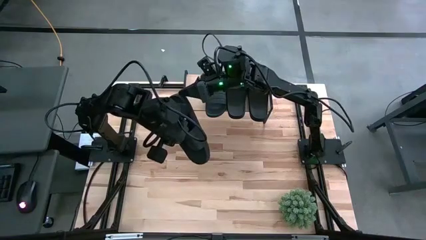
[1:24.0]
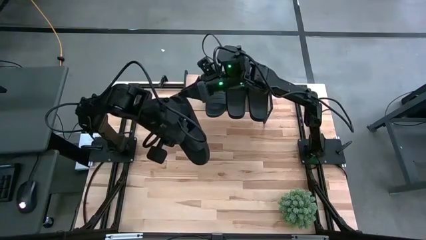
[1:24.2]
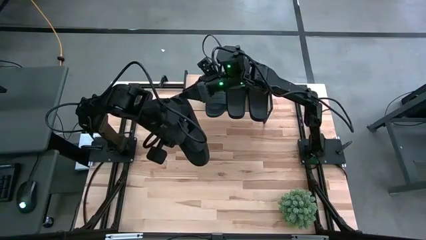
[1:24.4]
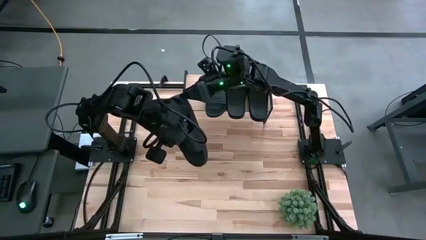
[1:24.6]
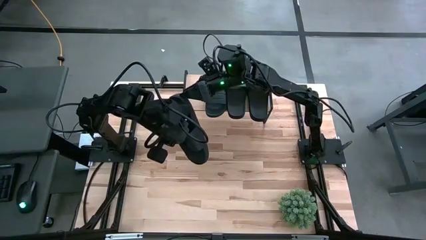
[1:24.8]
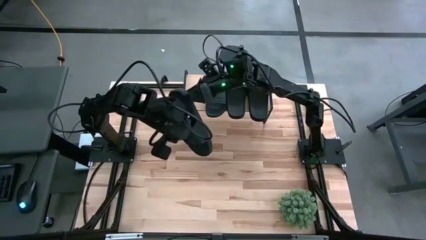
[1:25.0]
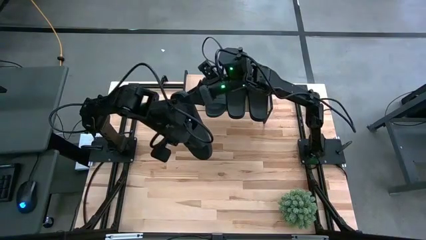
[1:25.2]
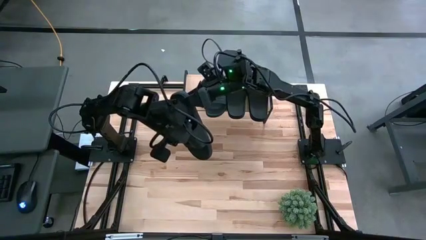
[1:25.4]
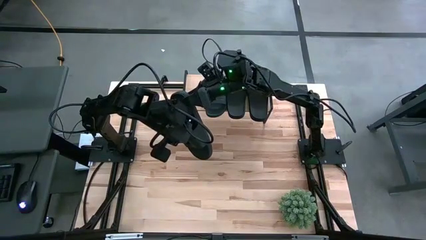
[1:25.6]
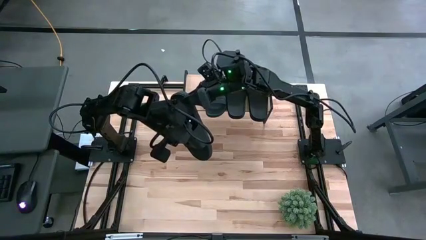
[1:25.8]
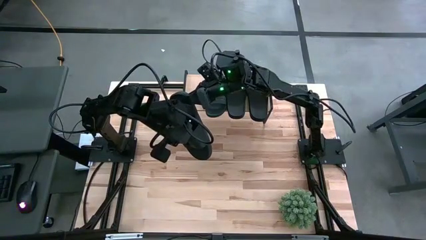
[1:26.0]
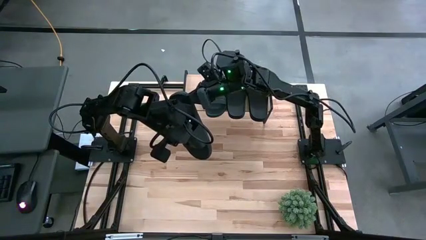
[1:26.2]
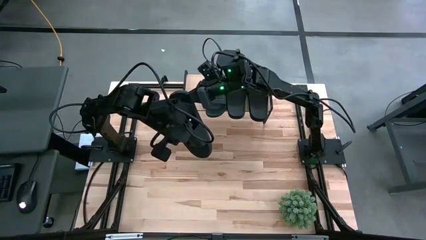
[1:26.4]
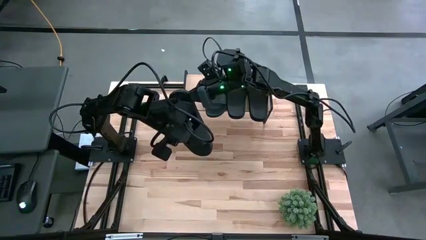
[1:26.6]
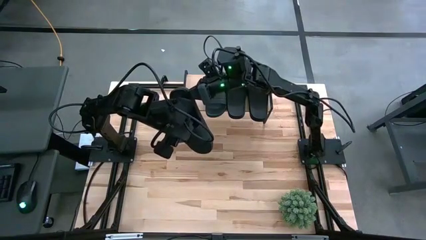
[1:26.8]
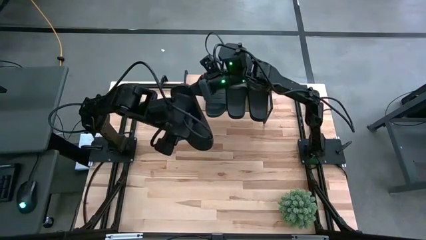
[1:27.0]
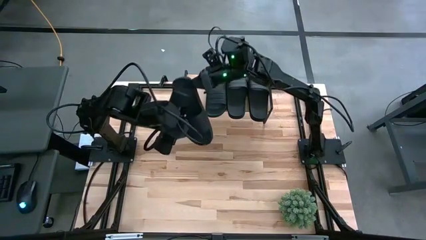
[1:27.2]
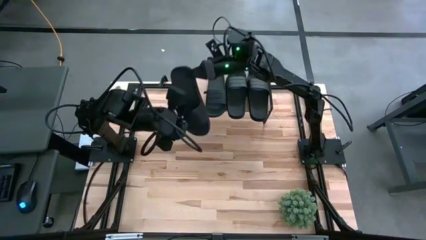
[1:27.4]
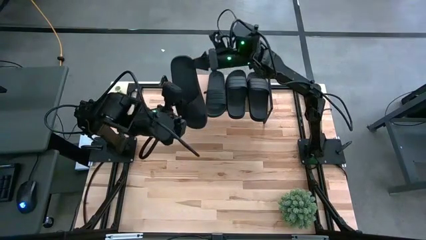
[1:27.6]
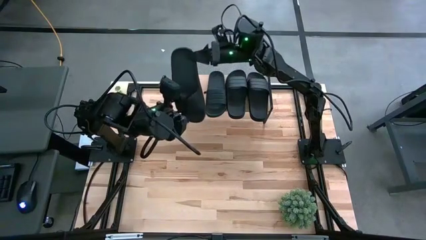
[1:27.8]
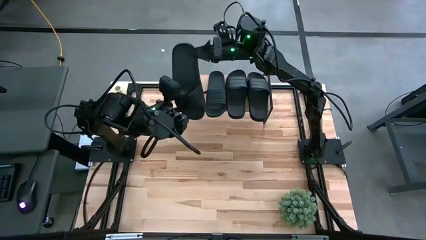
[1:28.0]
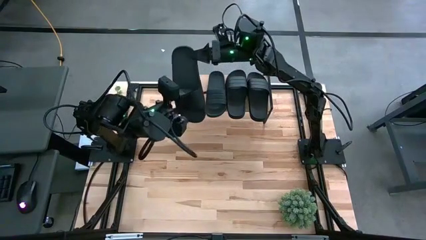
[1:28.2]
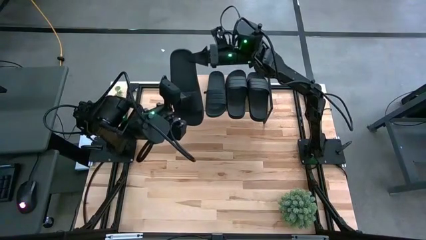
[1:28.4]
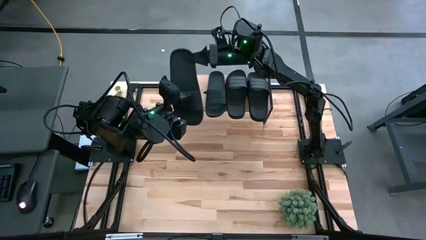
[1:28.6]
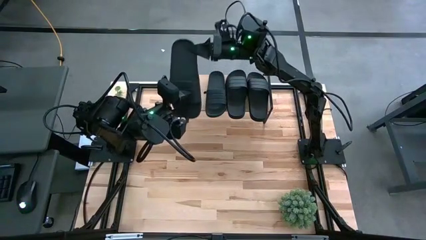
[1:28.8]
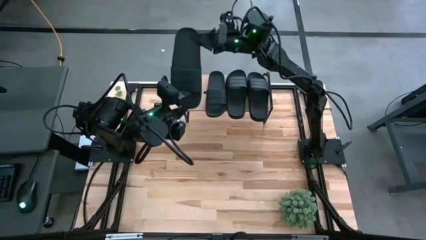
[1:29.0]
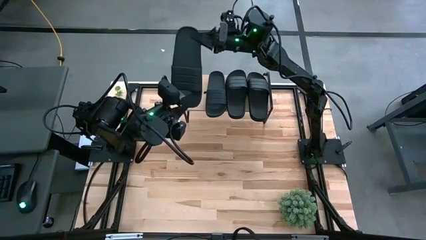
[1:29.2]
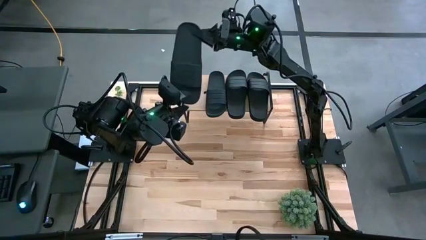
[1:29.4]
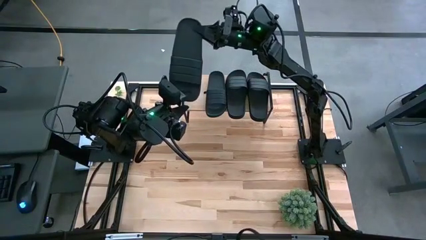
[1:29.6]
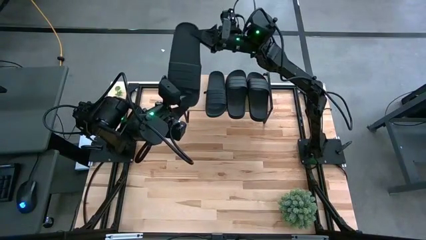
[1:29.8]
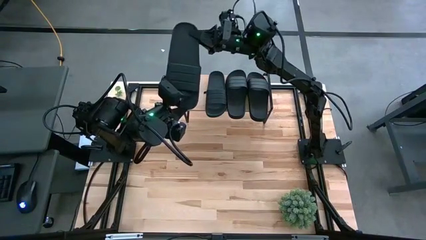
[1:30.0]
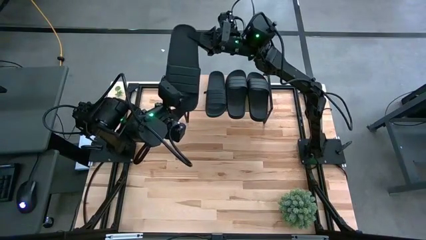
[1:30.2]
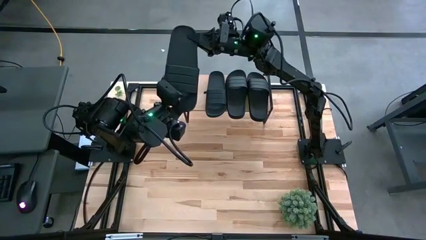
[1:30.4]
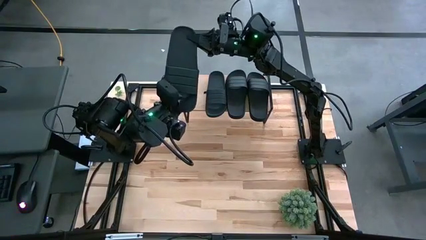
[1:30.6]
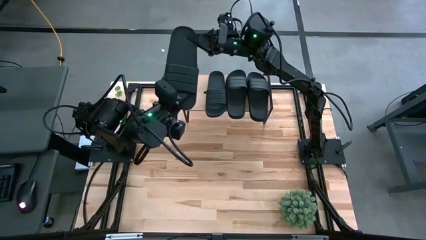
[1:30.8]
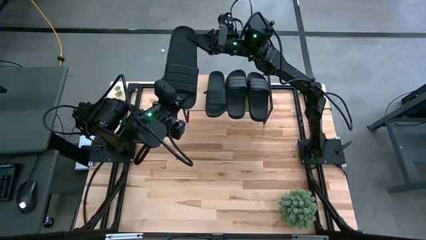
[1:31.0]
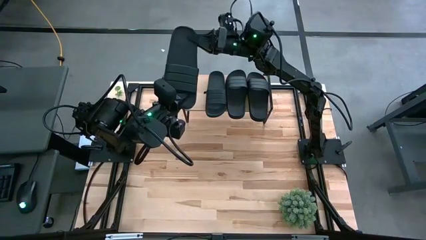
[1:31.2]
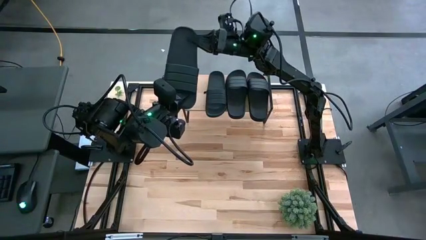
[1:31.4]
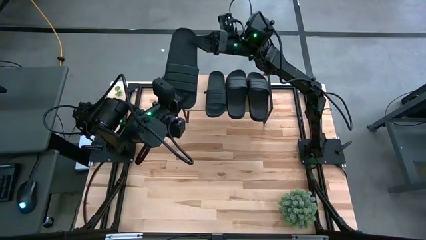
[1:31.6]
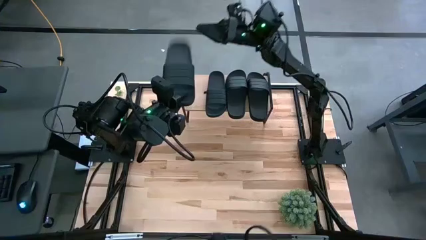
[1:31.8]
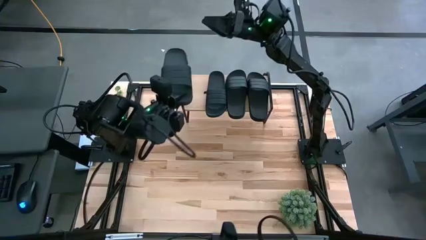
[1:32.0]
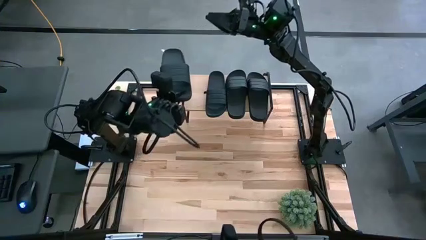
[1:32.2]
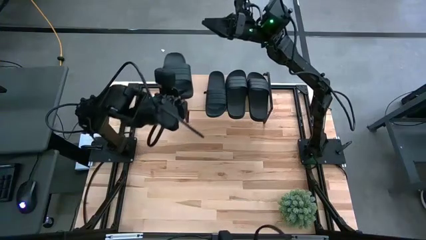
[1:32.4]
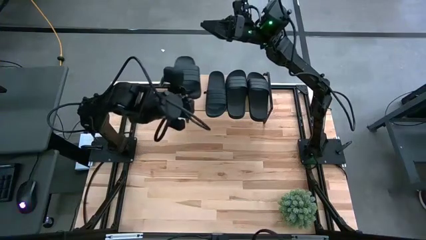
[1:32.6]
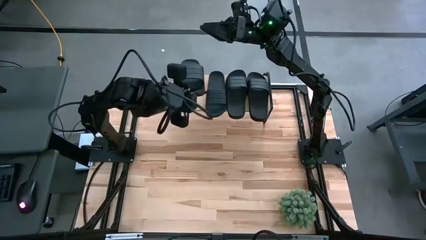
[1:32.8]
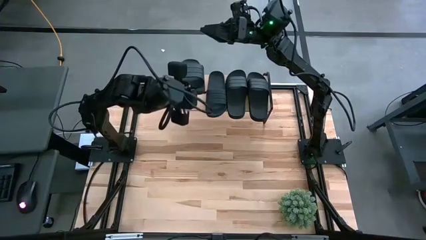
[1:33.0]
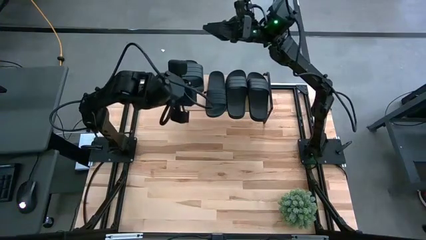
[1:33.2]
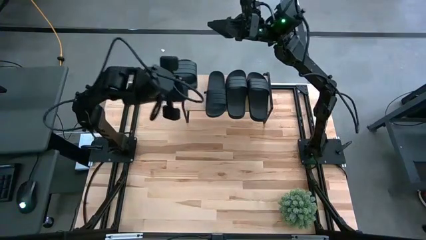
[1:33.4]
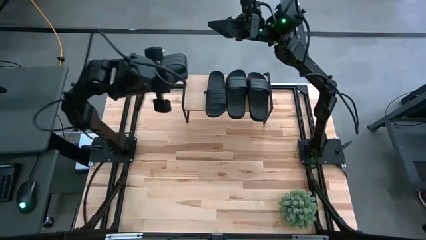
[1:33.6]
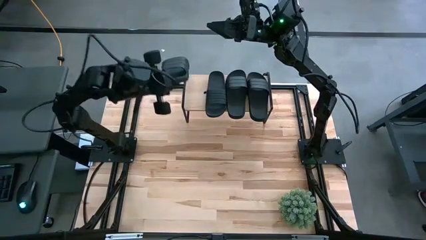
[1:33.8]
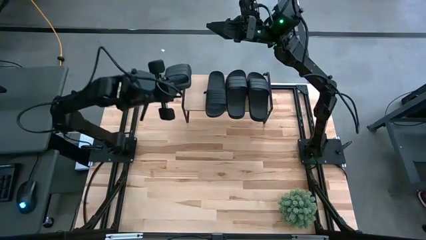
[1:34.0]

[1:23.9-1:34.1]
Task: Pick and place slides into the shelf
Put the black slide on the shelf

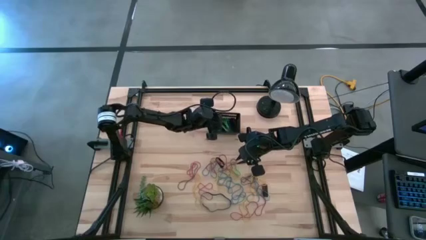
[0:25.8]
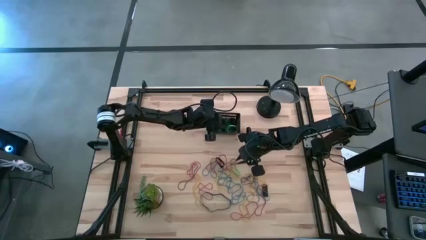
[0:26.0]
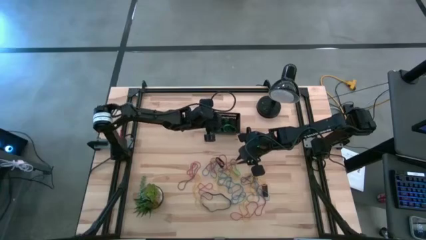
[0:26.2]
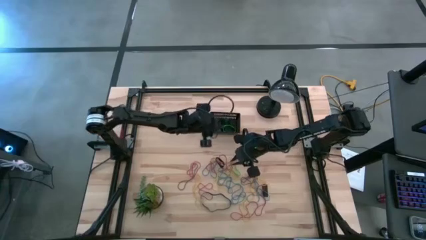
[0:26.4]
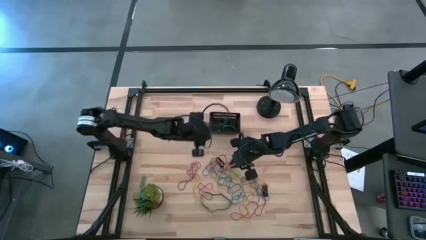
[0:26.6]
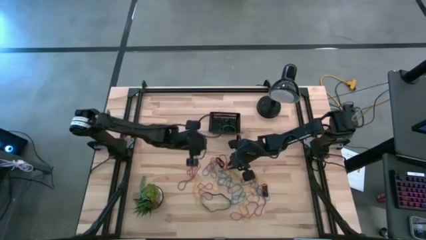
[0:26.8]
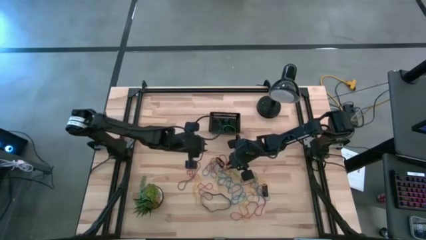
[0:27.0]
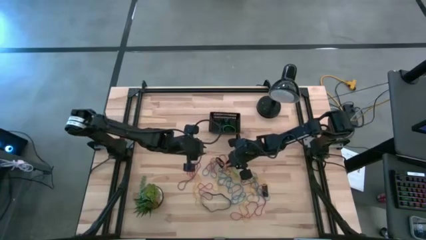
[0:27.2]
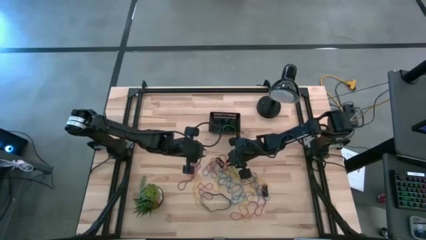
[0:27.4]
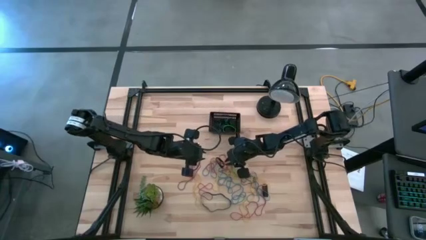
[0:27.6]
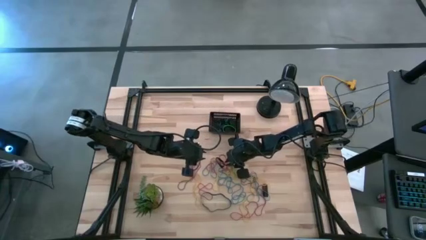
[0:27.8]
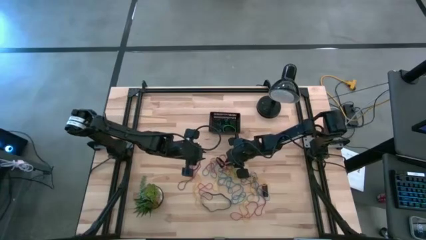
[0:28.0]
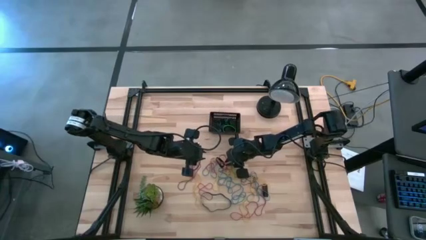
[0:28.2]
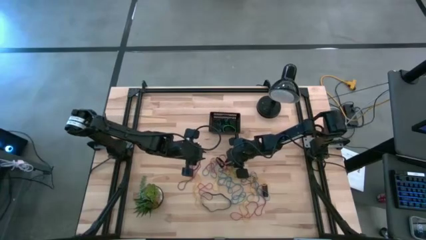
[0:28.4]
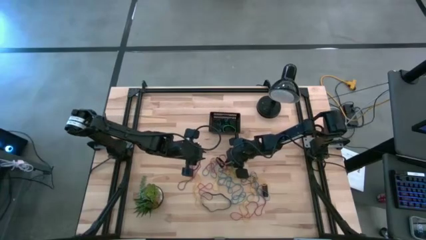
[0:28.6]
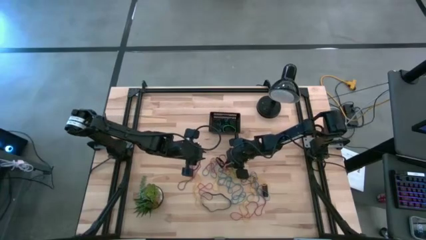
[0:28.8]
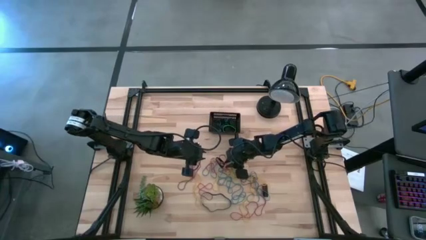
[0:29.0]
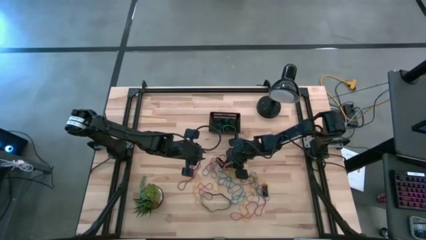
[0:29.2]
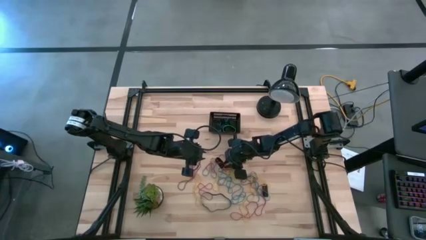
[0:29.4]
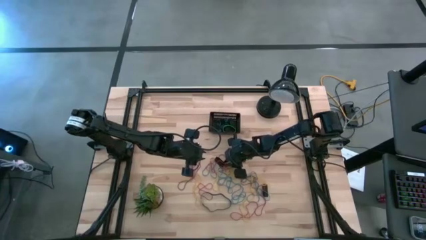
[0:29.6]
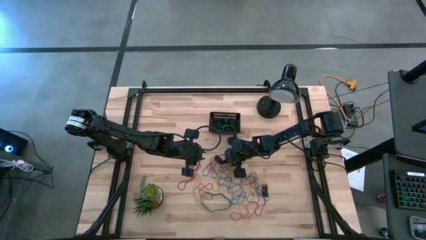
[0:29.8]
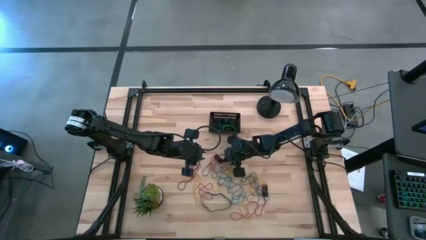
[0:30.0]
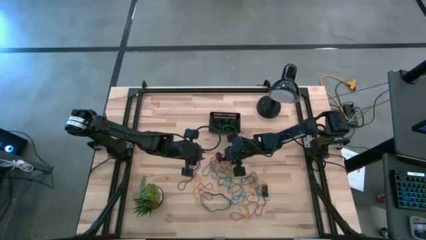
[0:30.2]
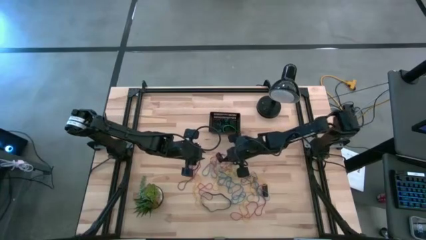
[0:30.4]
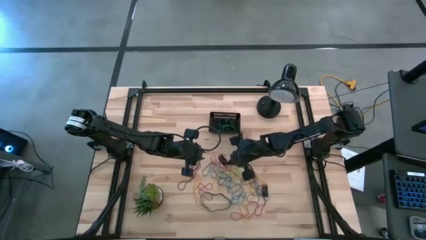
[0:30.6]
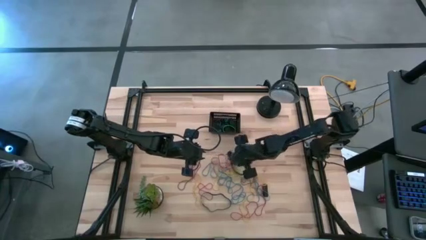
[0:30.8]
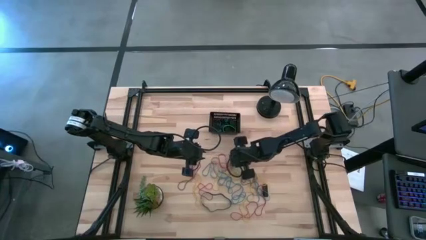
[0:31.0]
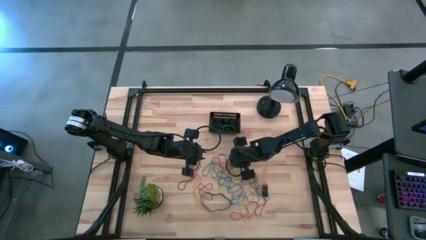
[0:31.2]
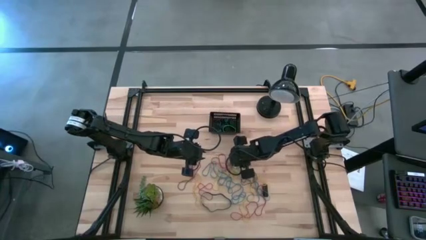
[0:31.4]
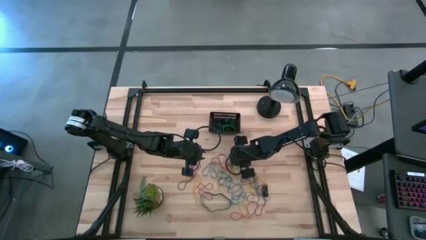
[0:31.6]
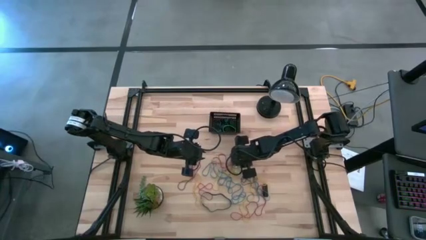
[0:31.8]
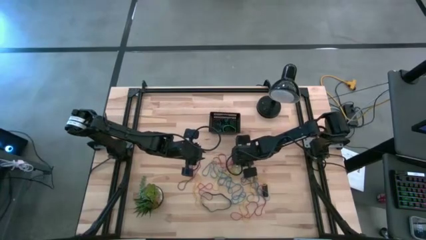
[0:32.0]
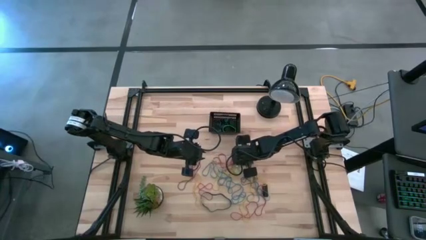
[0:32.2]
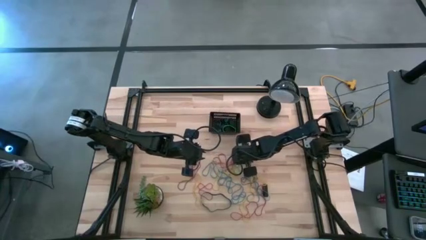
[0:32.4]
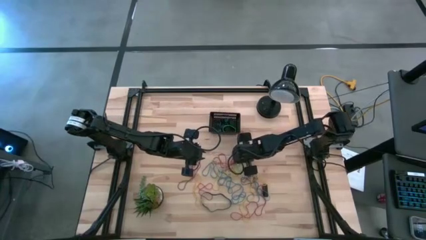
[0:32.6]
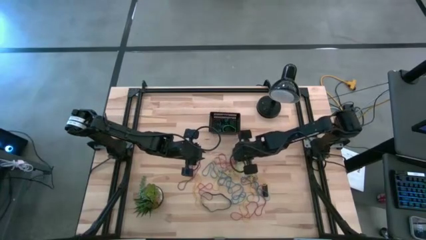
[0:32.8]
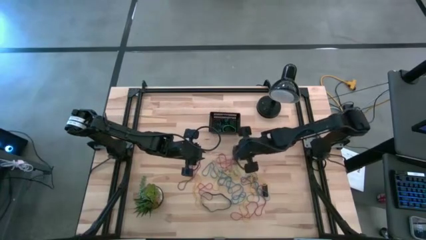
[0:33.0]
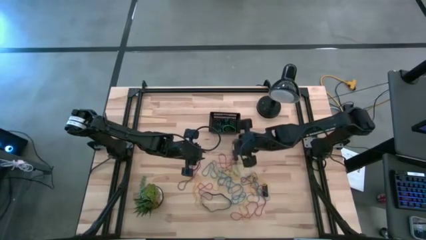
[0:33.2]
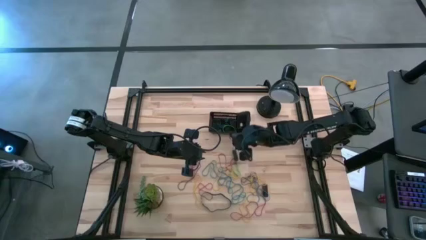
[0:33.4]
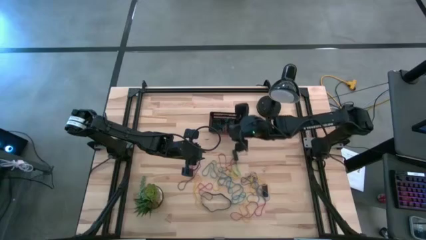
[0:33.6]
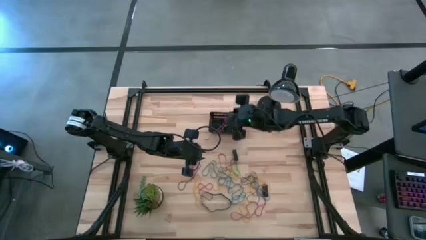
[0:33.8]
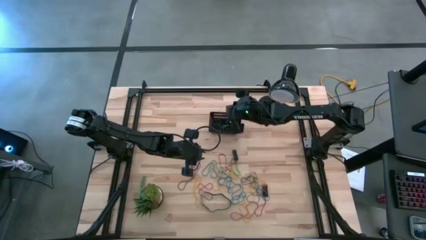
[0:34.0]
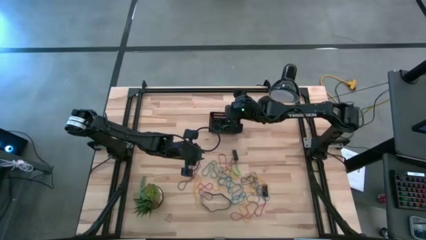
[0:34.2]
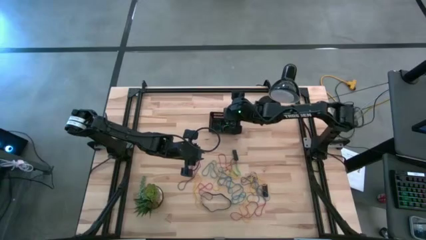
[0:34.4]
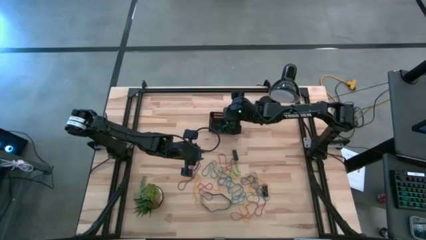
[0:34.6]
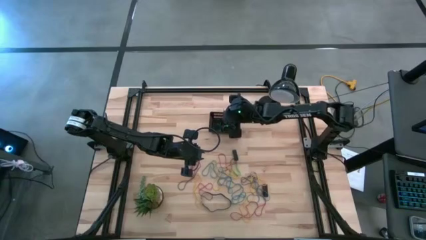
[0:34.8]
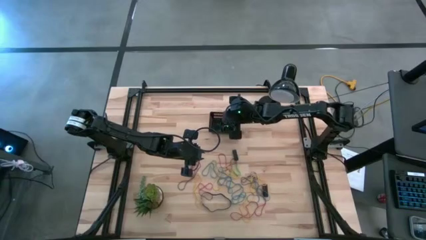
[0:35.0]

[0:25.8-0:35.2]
Task: Pick and place rubber bands into bin
Put the red rubber band into the basket
